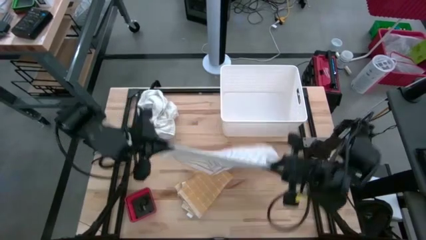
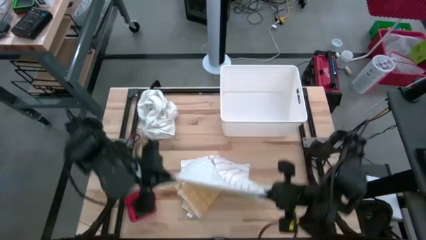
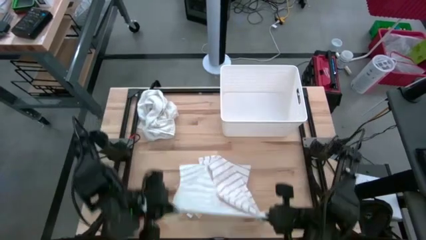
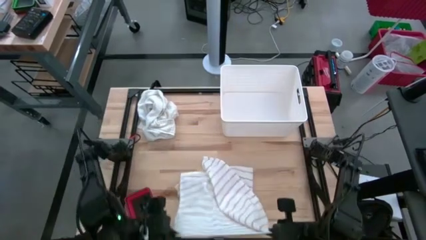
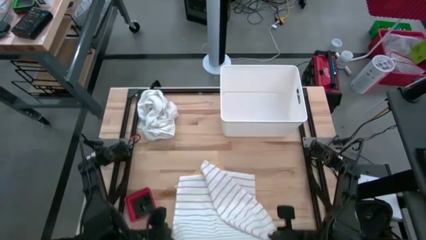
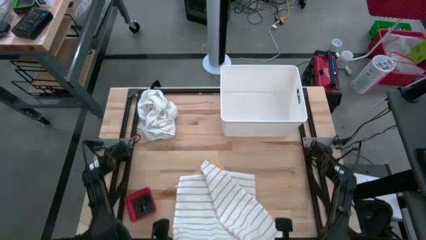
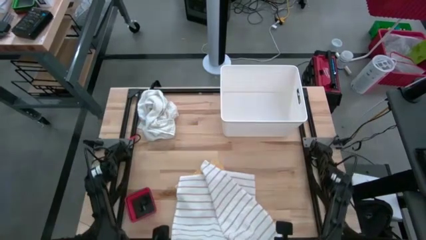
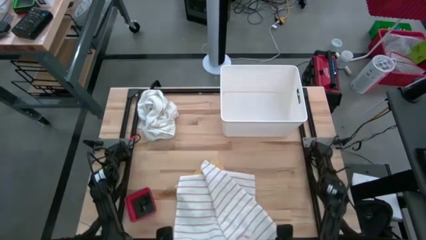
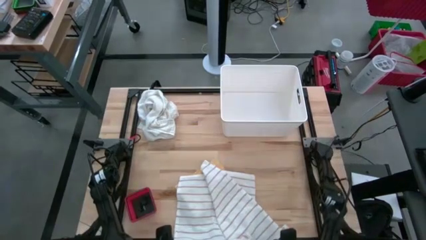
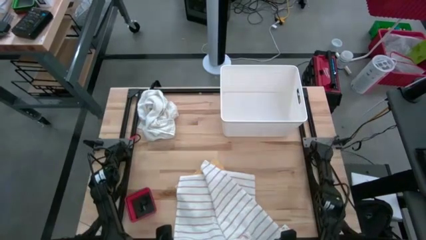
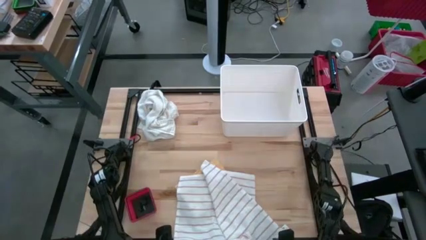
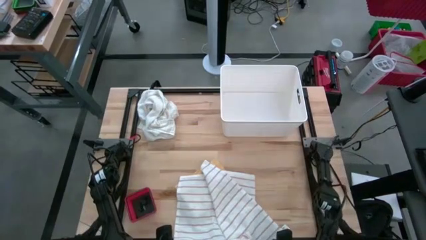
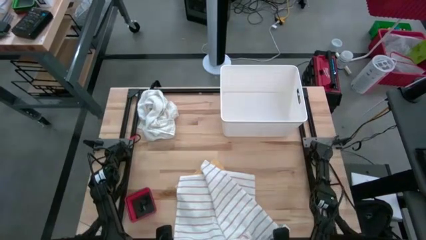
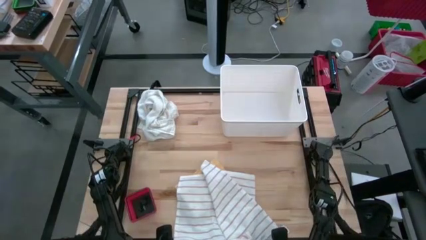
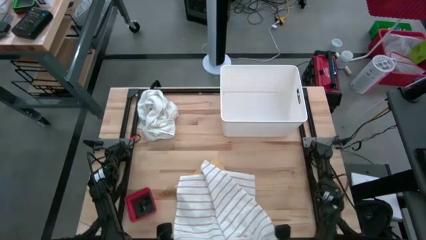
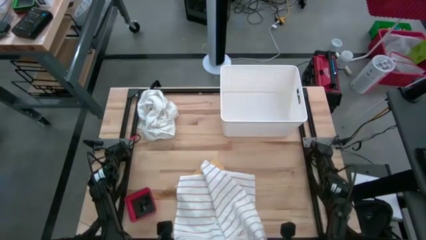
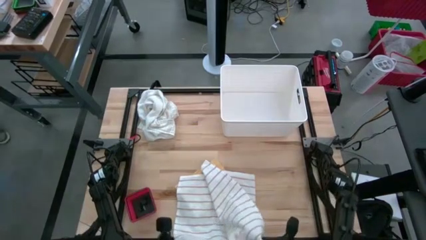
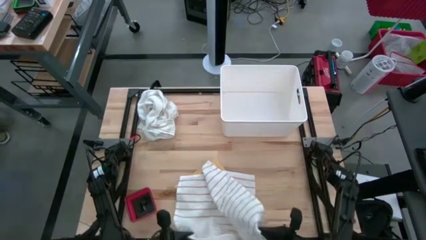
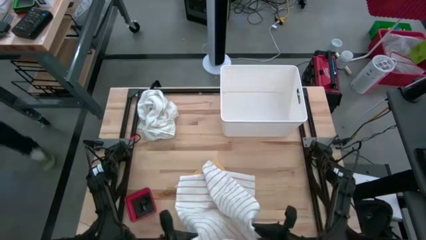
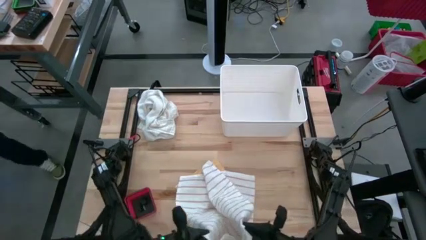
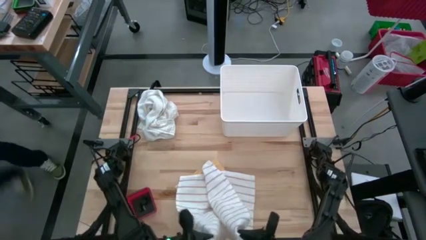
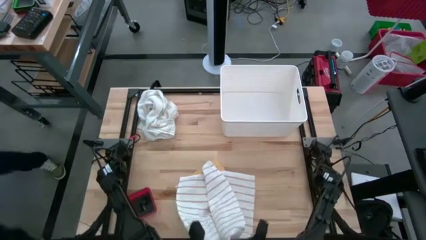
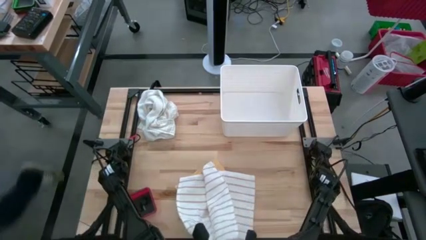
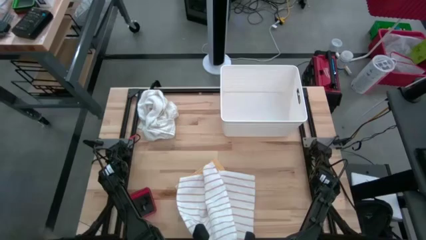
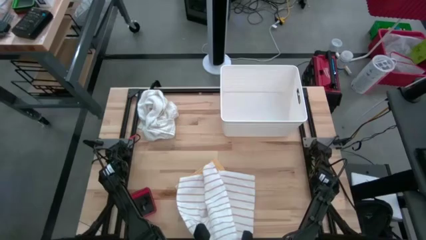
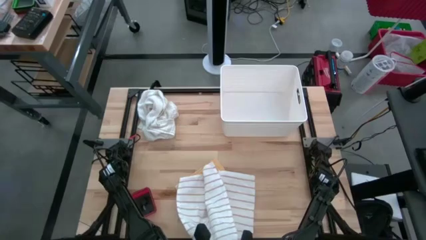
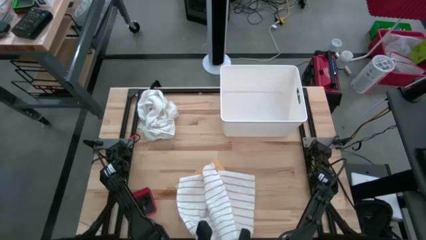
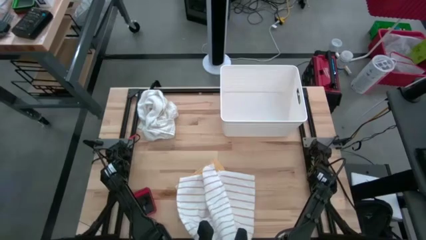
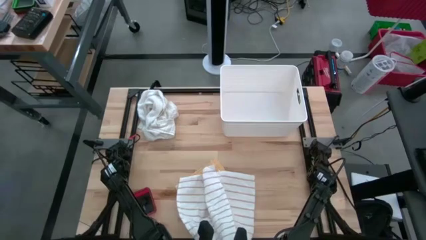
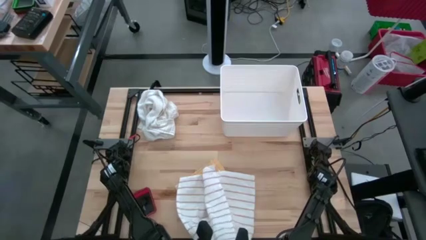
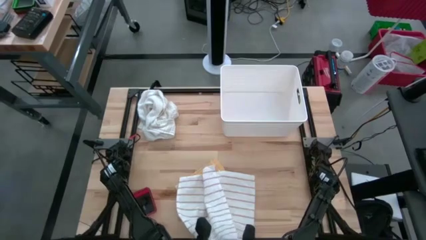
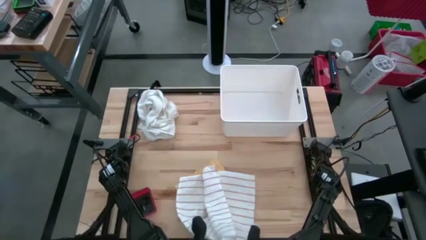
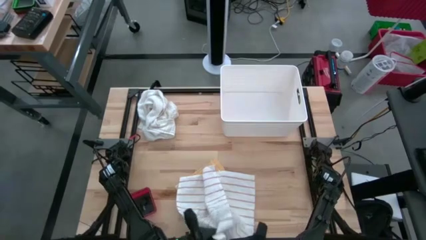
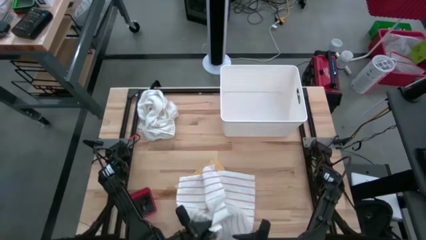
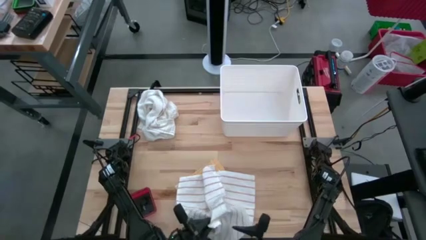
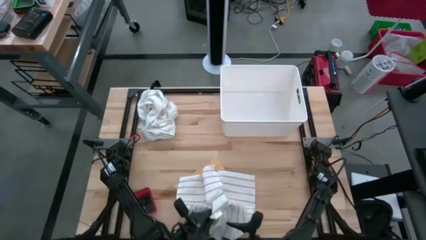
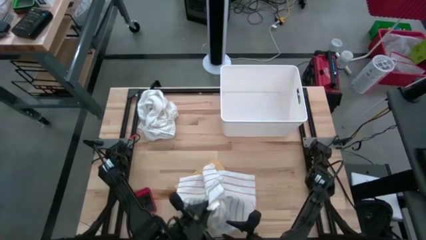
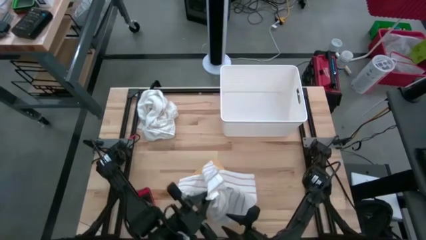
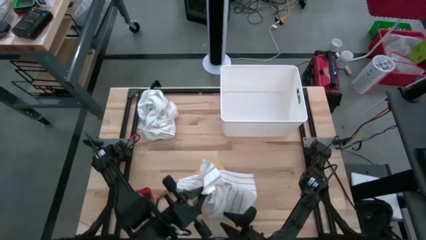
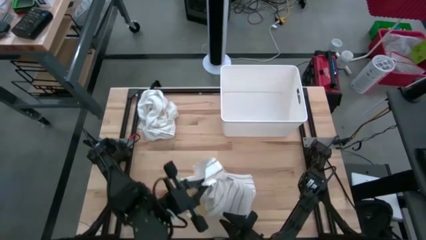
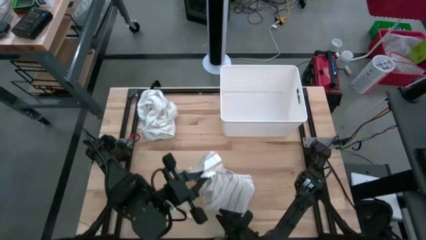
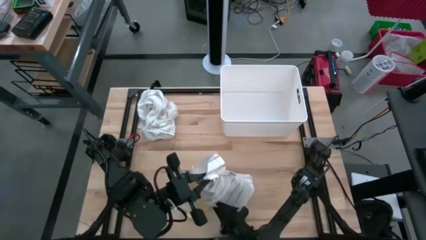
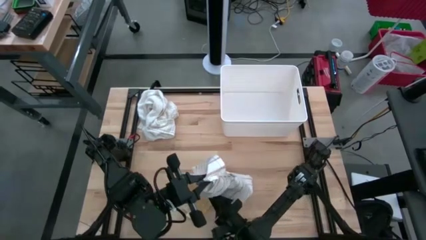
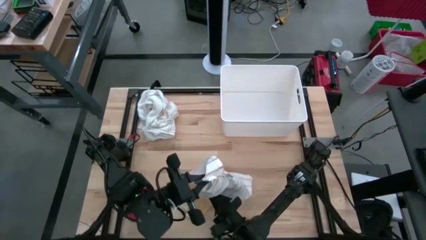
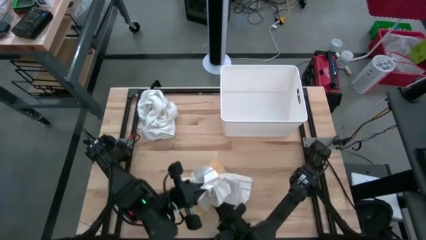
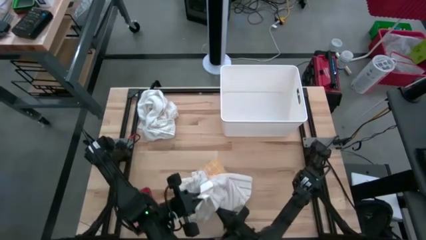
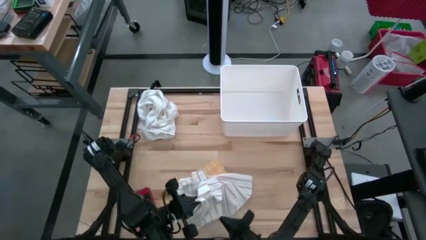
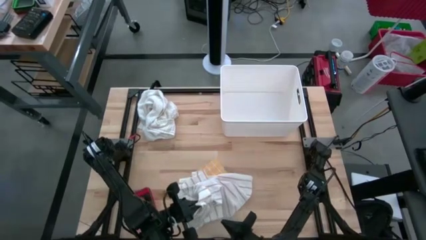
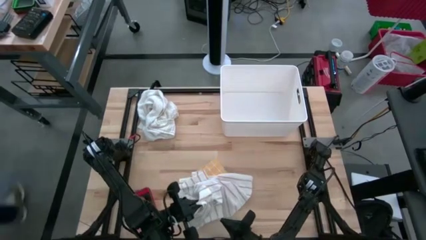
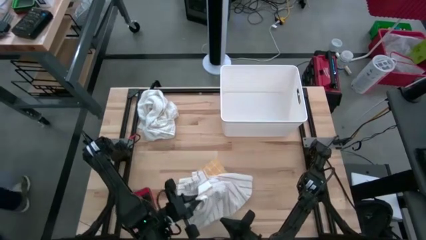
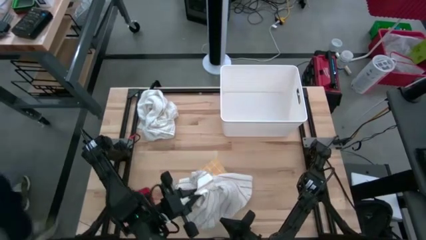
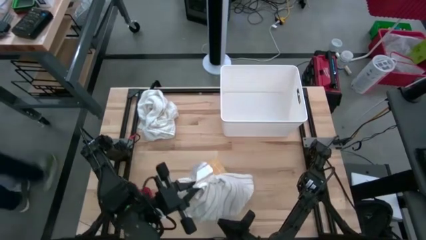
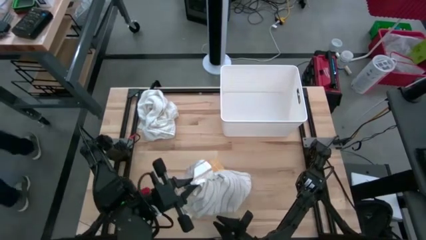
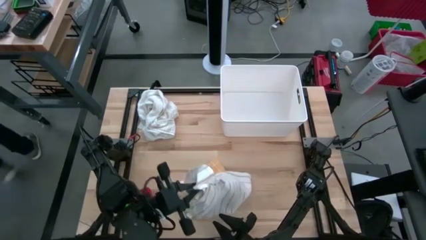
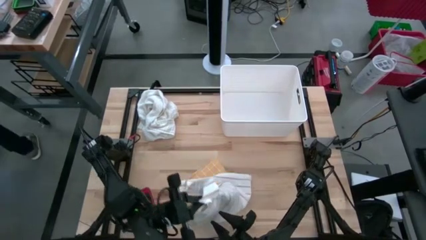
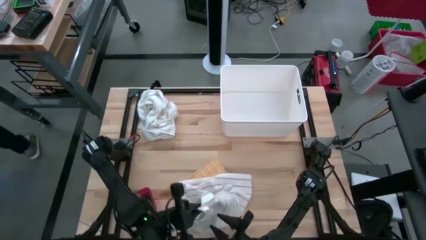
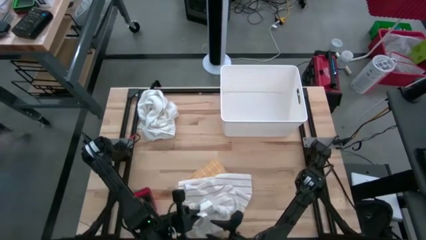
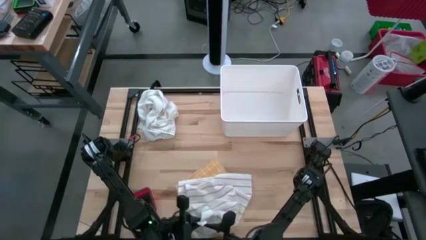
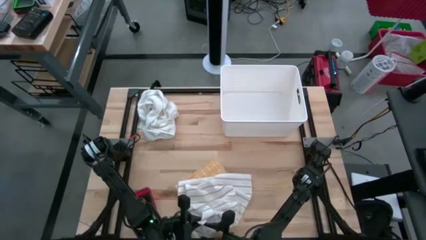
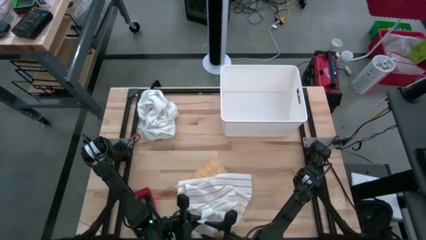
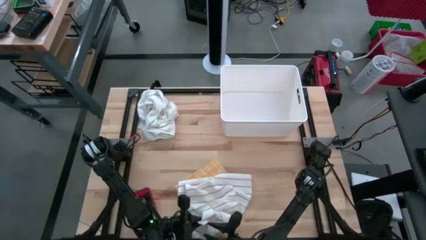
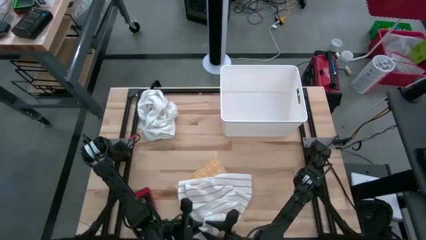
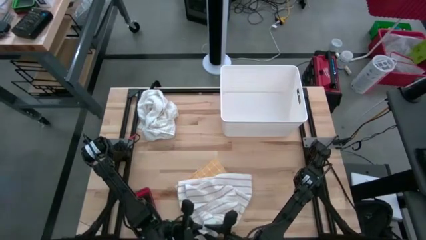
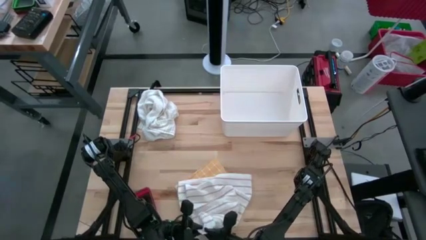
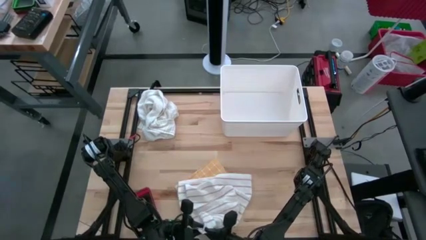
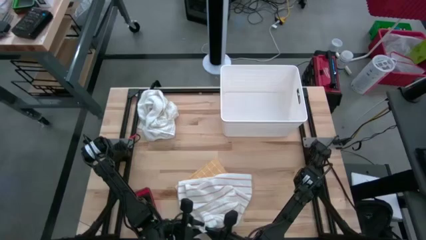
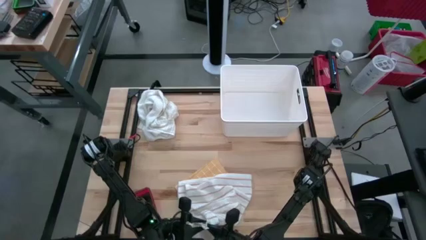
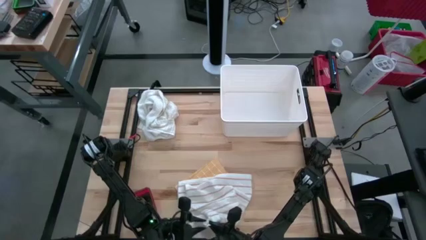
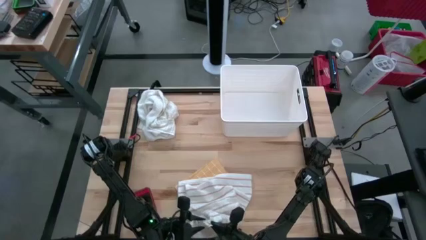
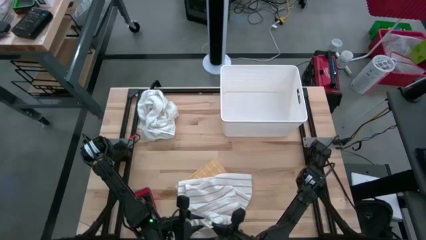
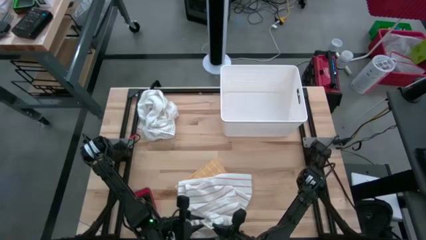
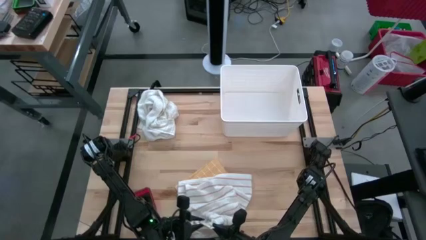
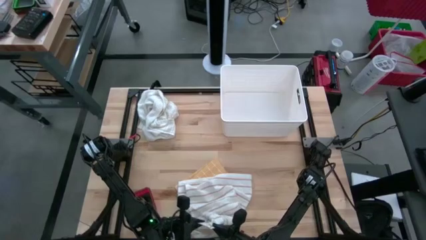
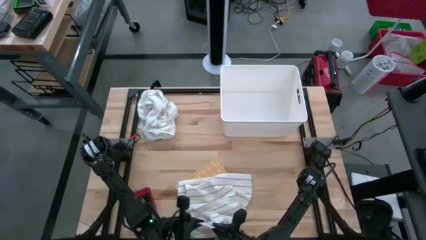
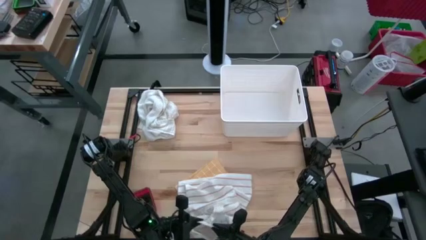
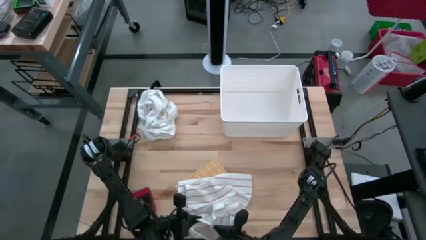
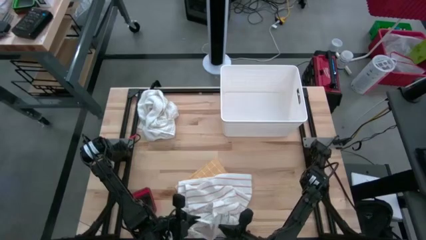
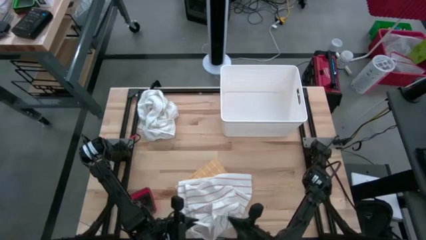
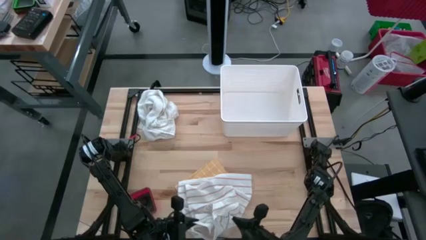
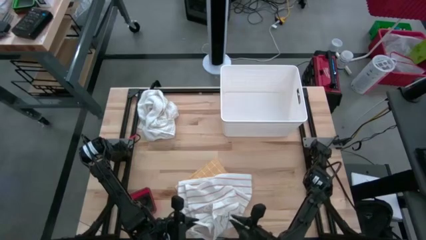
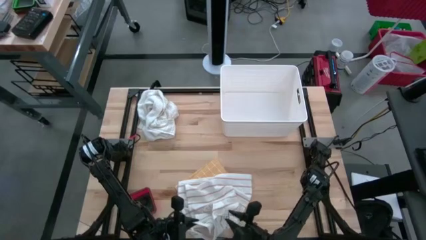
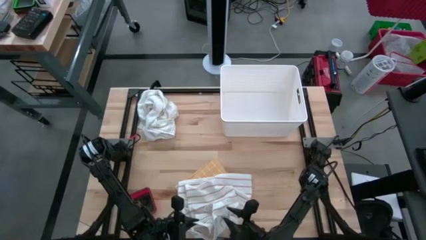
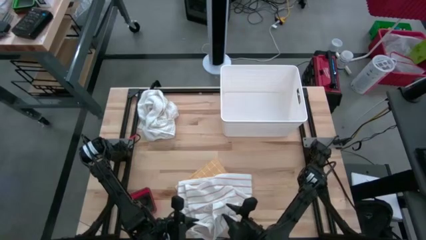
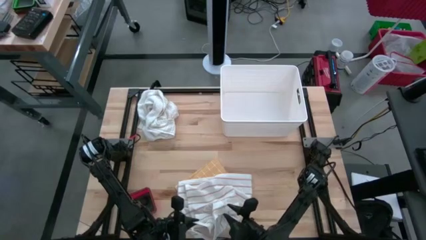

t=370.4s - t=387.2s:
Task: Fold towel
Fold the white kitchen towel
